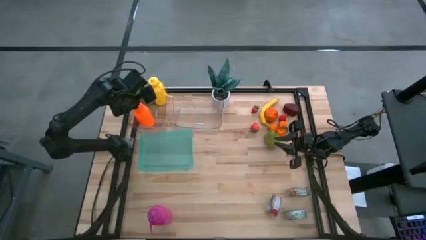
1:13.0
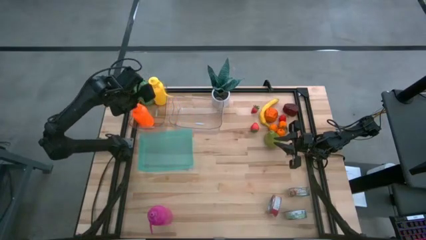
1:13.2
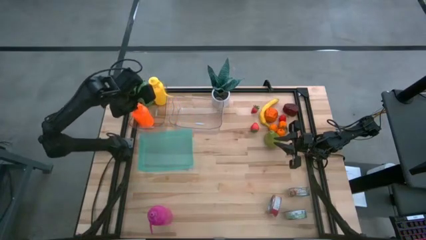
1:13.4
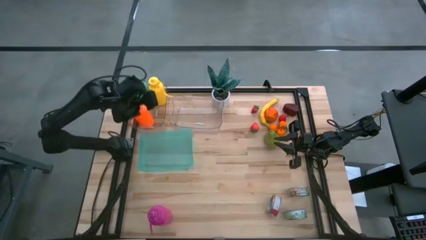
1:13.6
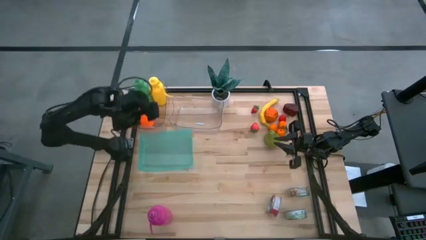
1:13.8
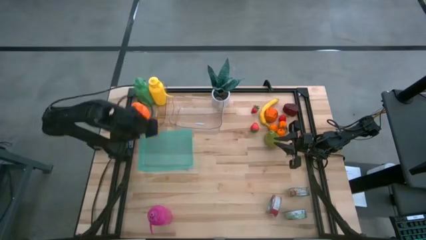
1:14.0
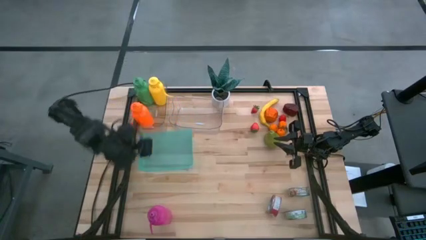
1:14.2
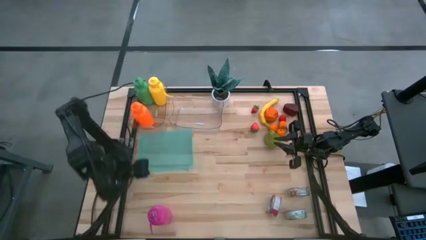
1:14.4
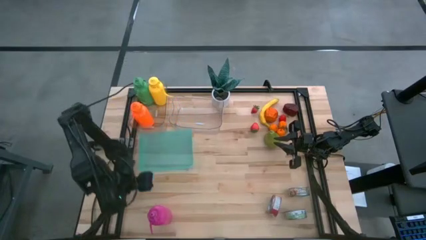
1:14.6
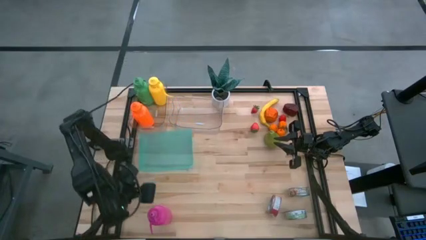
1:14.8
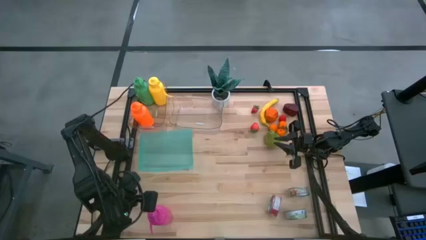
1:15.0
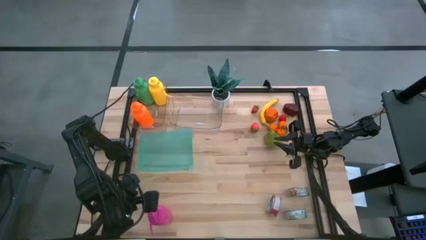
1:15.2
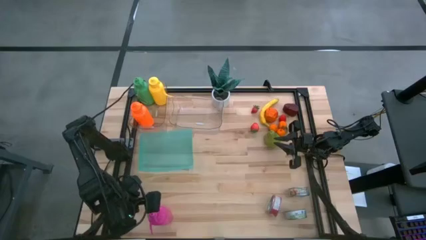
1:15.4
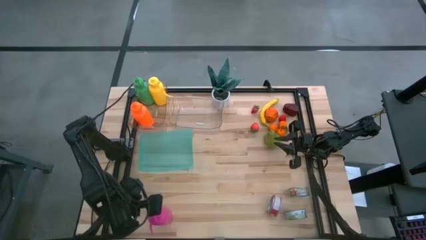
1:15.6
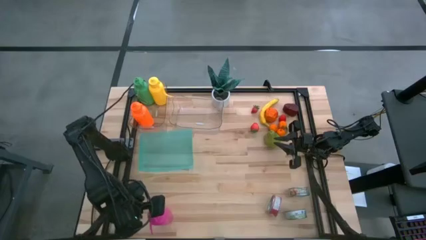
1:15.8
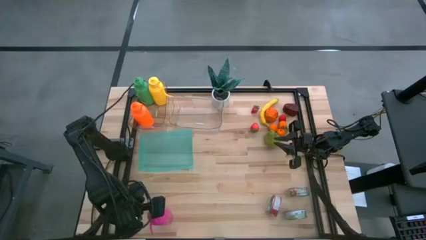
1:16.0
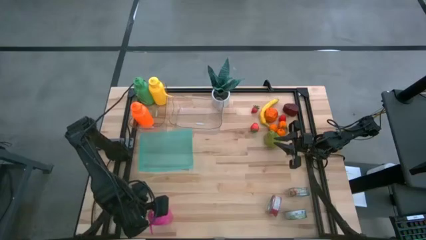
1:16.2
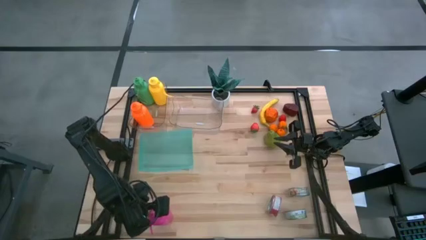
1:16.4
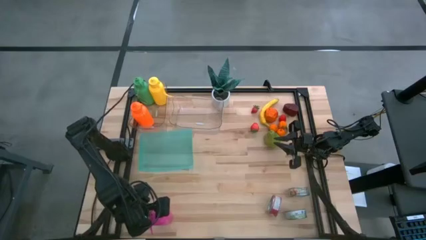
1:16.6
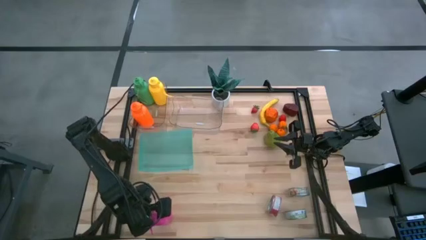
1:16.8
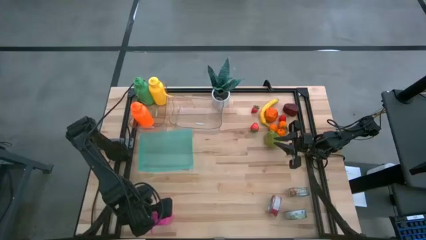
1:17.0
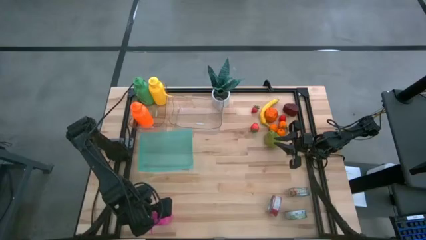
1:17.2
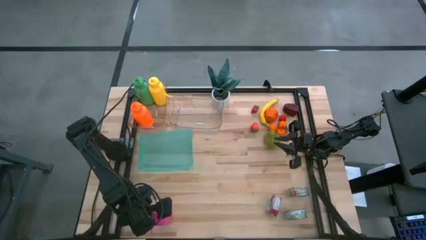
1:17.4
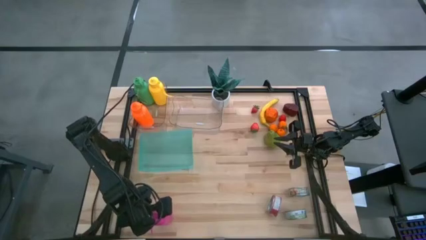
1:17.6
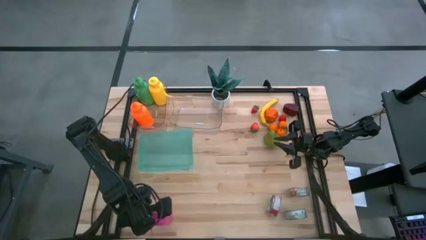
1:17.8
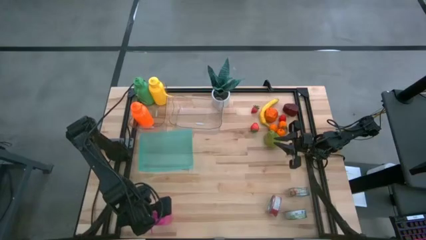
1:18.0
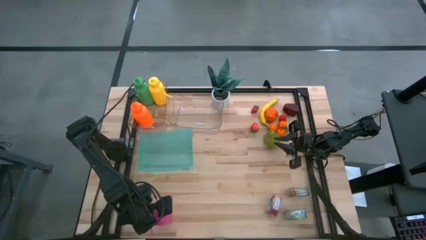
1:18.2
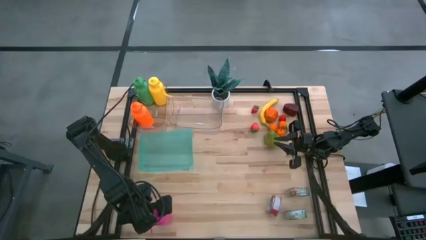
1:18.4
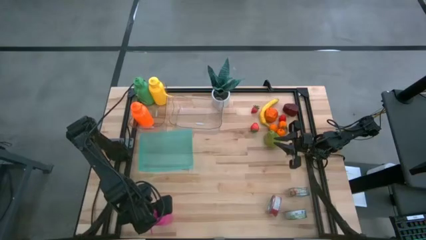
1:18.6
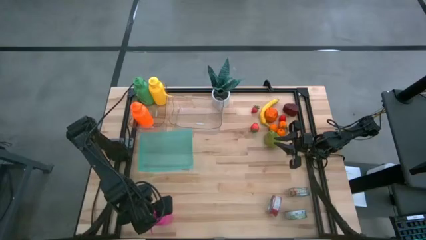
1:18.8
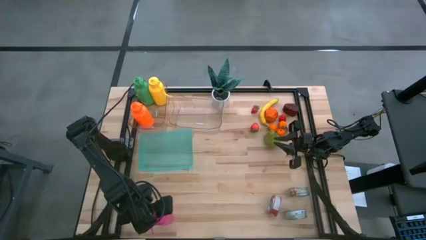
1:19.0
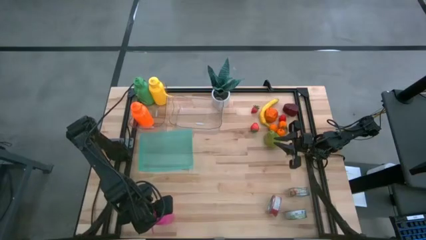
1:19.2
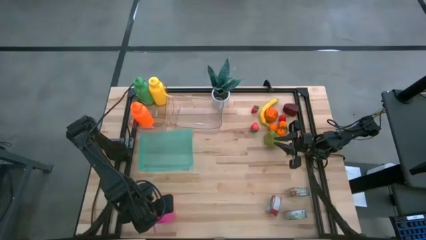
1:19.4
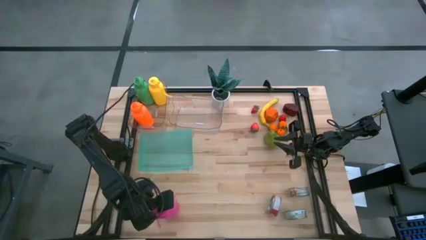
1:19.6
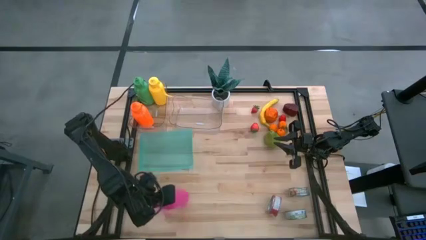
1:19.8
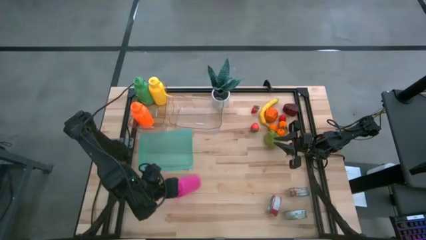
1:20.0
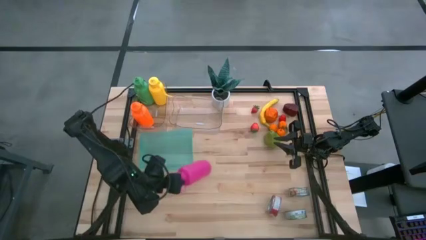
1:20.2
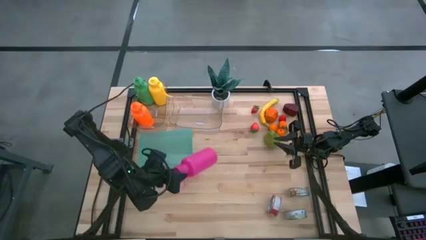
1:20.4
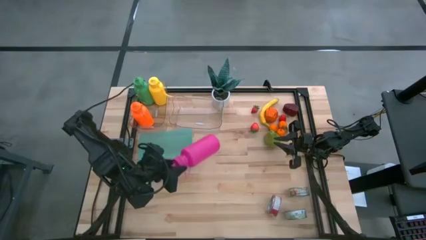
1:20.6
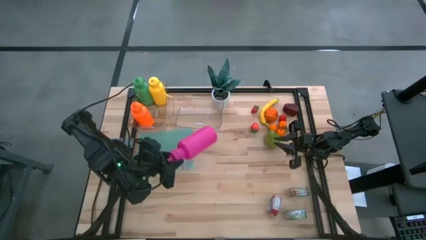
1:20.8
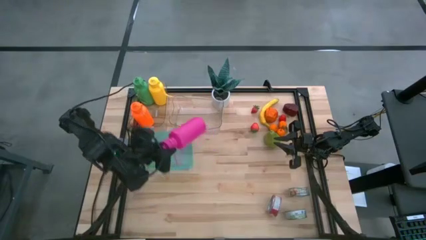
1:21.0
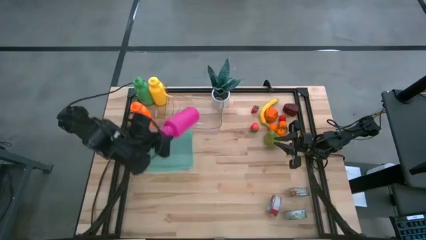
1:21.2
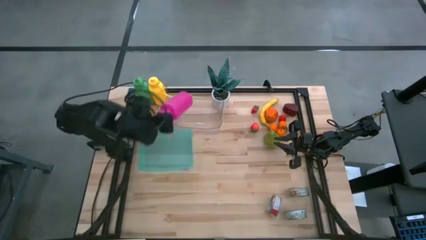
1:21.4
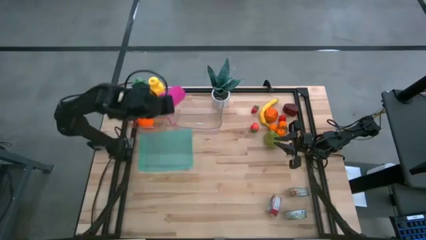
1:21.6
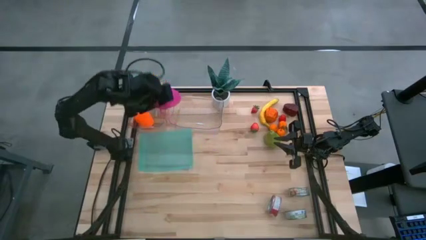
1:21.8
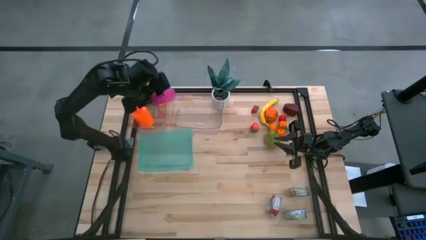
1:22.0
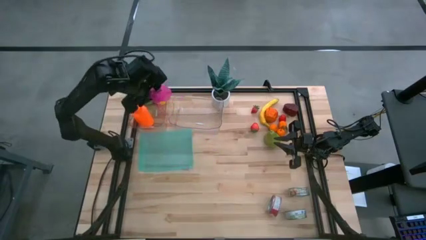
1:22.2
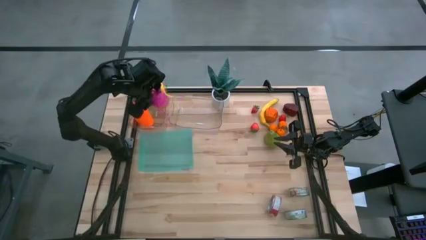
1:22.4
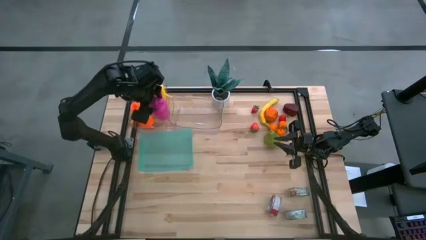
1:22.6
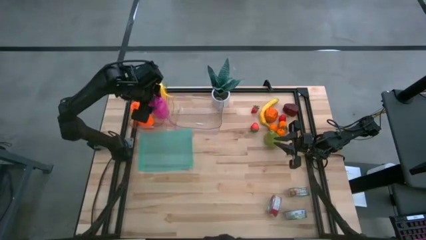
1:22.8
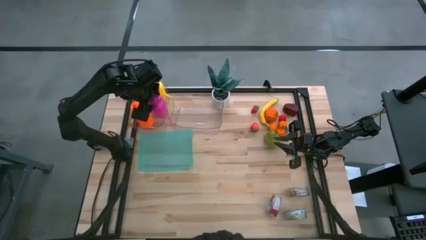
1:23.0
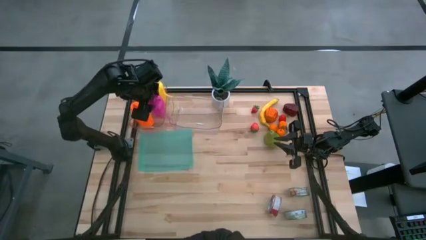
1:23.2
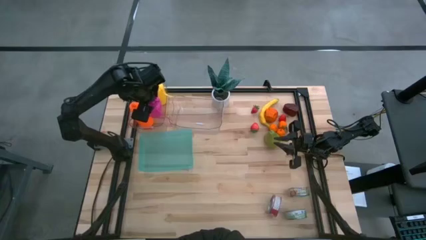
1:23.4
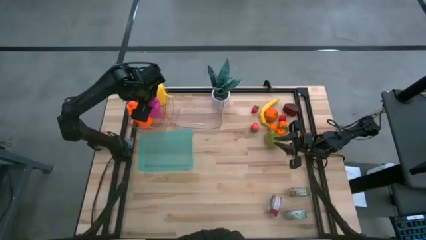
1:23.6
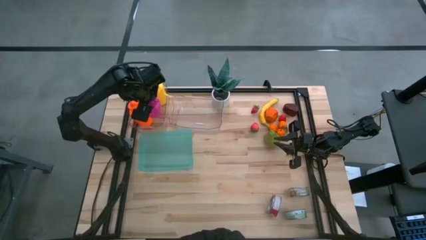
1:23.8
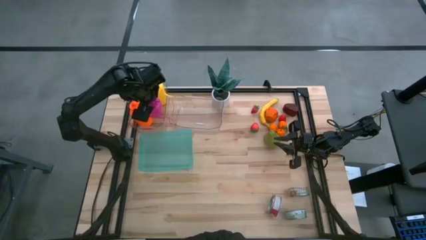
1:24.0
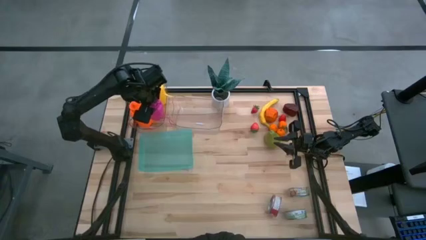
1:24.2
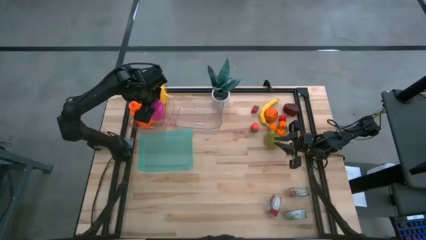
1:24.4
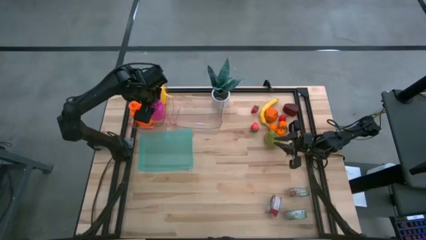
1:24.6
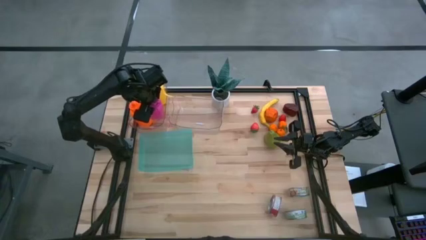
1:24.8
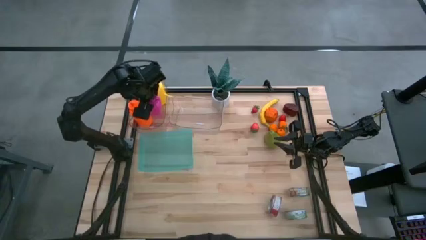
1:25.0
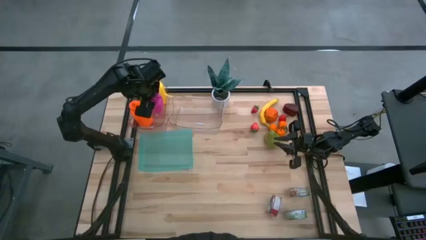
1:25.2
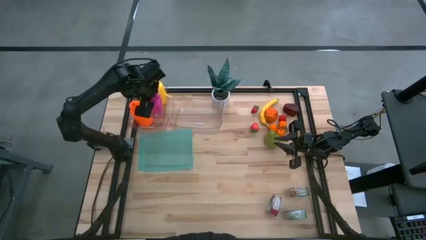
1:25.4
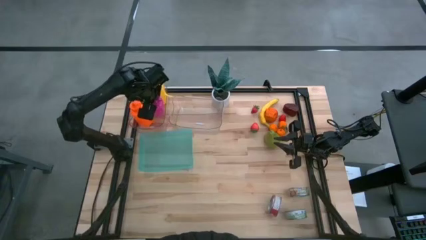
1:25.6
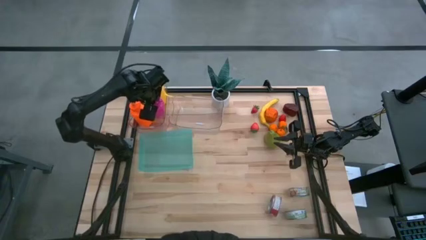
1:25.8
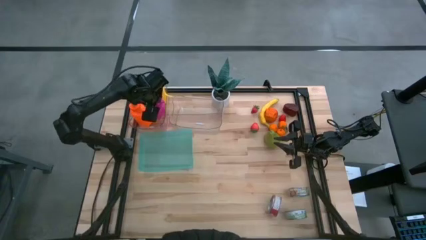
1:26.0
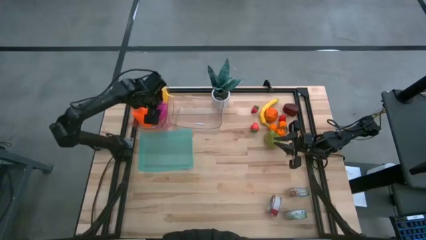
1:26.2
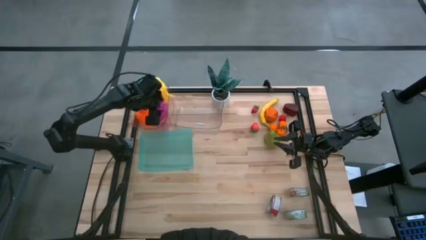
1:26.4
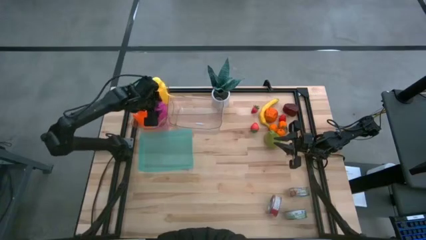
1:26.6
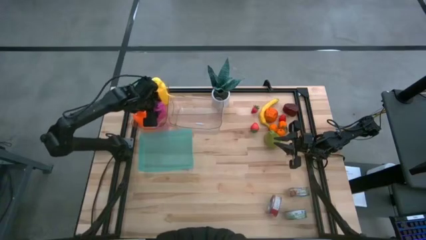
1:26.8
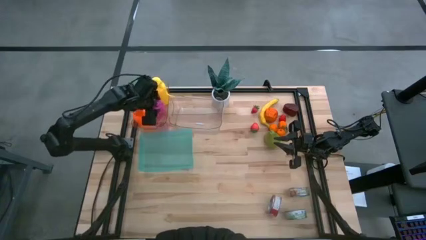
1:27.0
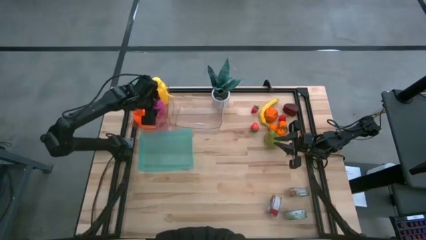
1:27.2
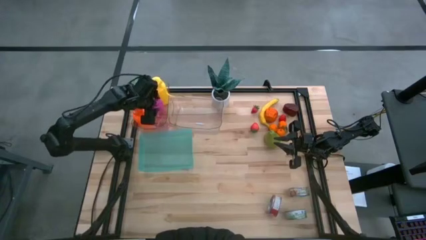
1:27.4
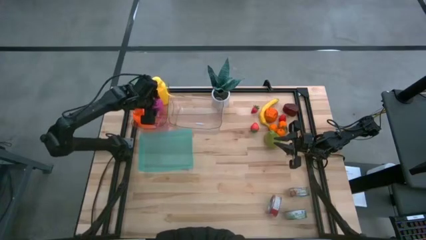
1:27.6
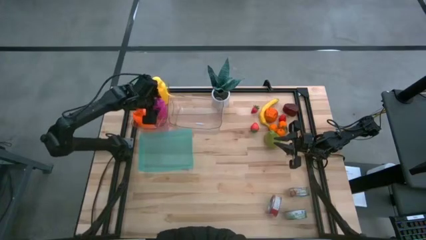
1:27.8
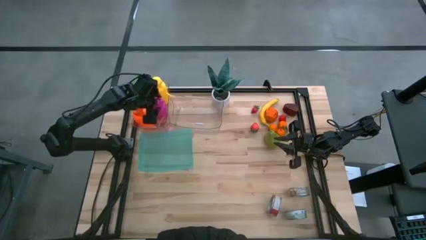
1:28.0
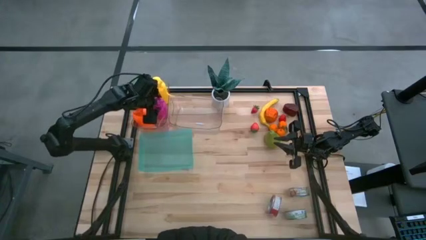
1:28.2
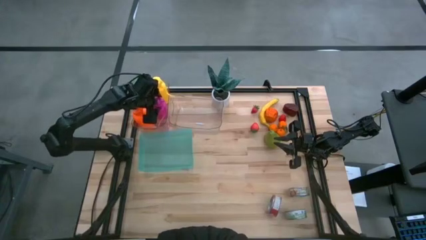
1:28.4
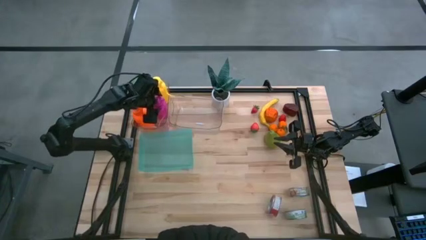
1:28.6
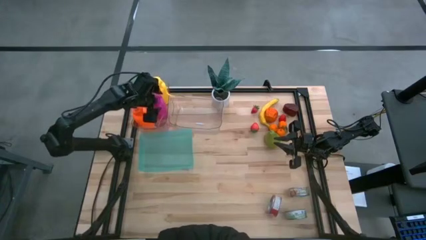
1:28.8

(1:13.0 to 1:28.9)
Task: Pick & Place Food Item
Put the pink water bottle into the left transparent bin
